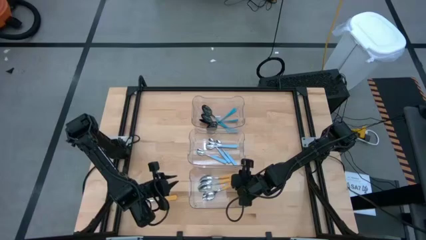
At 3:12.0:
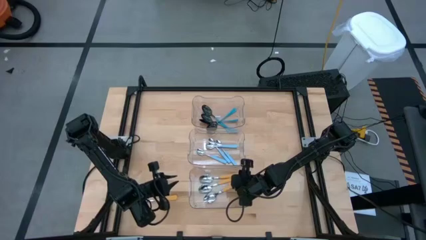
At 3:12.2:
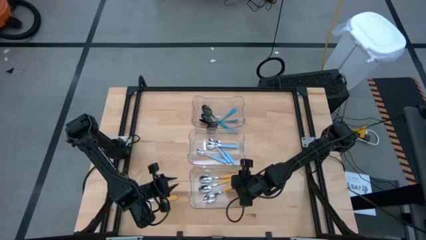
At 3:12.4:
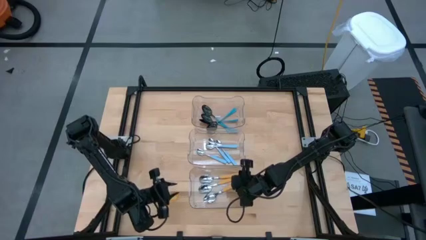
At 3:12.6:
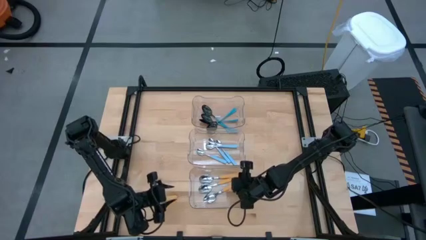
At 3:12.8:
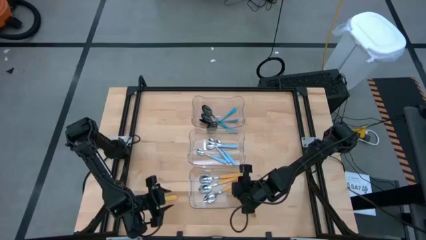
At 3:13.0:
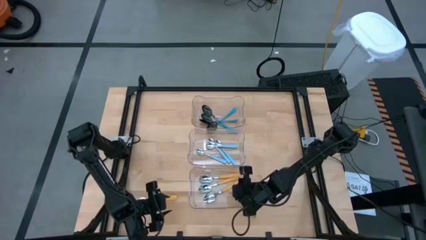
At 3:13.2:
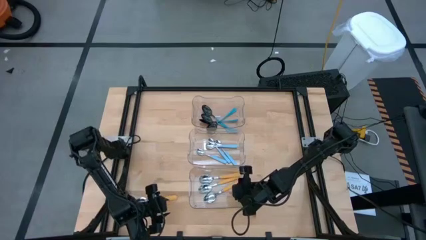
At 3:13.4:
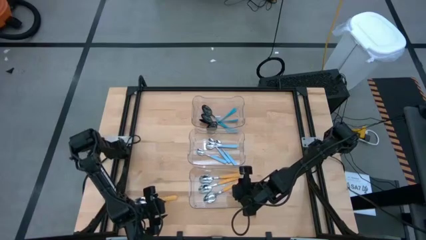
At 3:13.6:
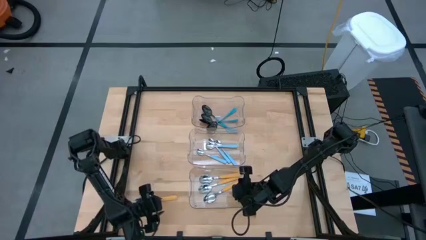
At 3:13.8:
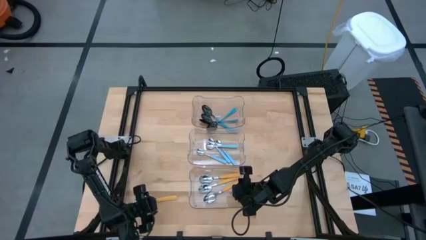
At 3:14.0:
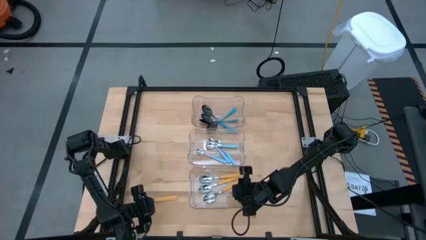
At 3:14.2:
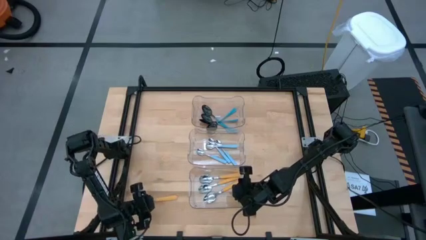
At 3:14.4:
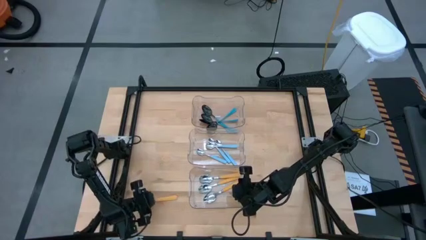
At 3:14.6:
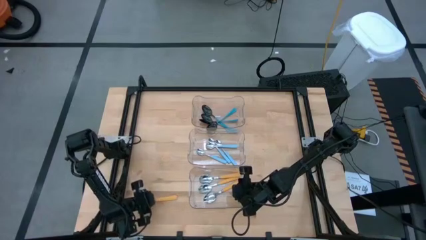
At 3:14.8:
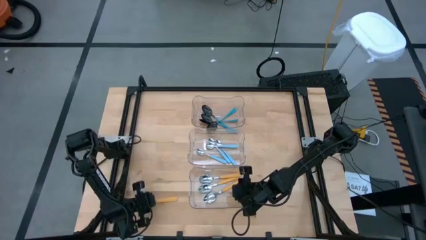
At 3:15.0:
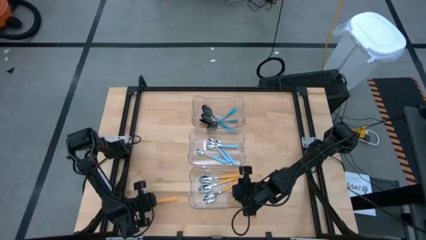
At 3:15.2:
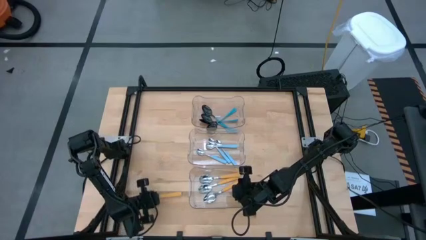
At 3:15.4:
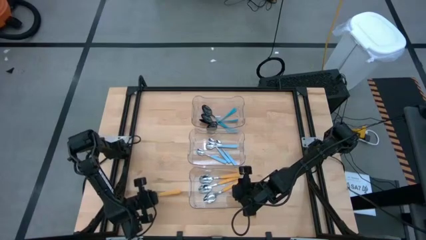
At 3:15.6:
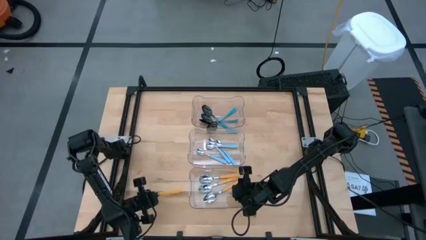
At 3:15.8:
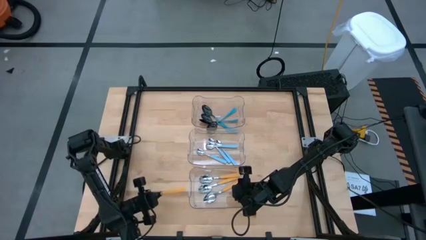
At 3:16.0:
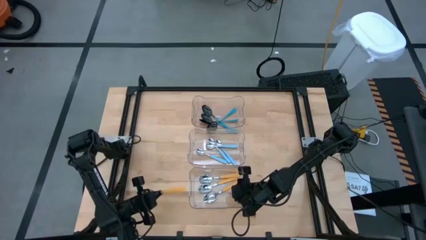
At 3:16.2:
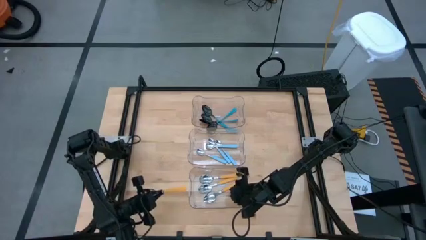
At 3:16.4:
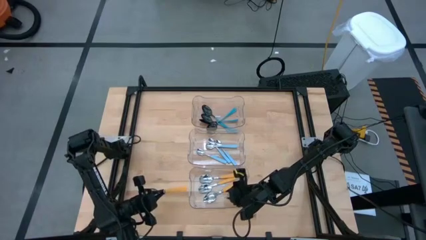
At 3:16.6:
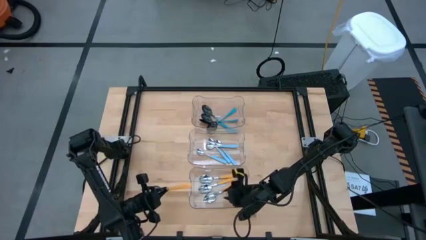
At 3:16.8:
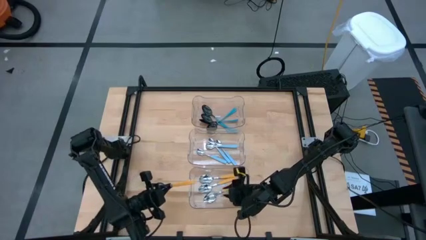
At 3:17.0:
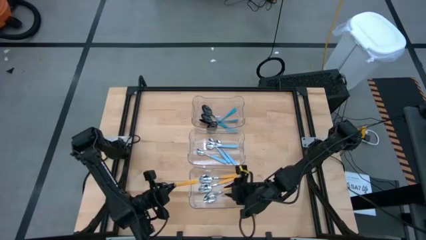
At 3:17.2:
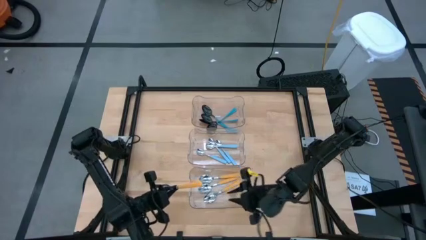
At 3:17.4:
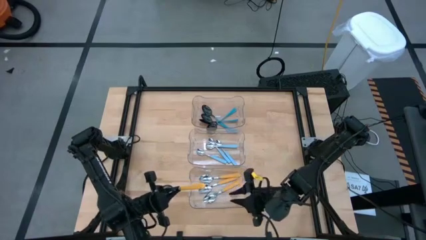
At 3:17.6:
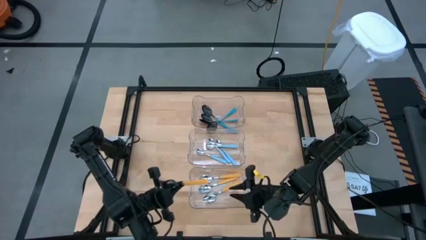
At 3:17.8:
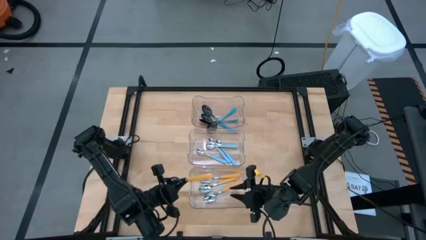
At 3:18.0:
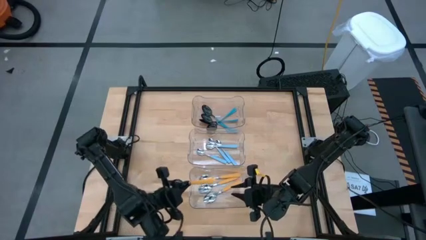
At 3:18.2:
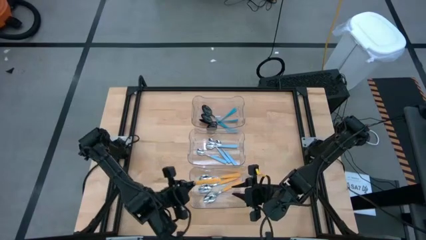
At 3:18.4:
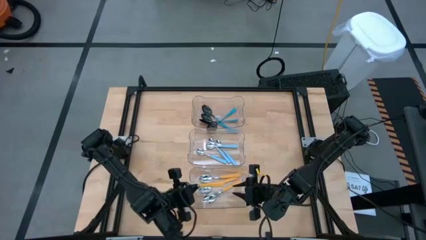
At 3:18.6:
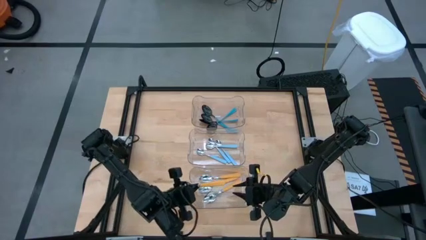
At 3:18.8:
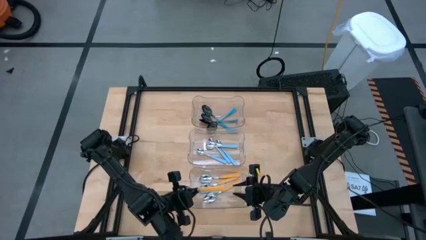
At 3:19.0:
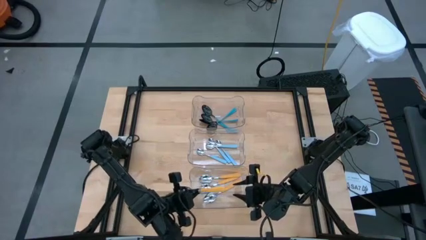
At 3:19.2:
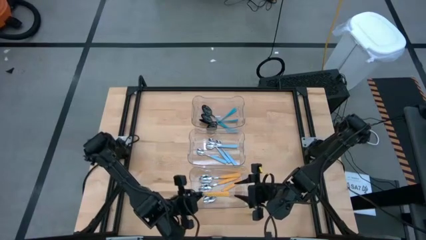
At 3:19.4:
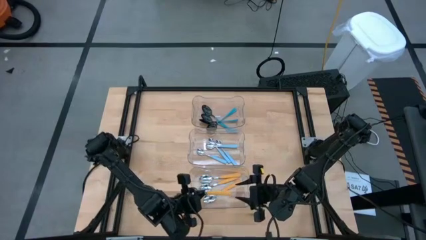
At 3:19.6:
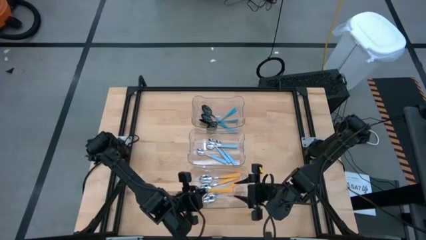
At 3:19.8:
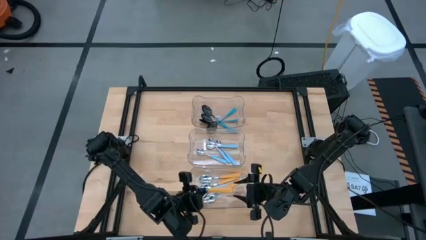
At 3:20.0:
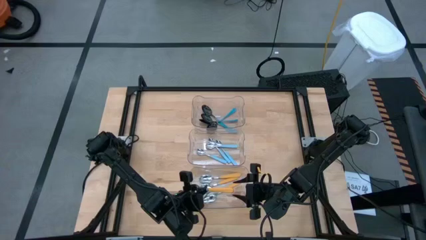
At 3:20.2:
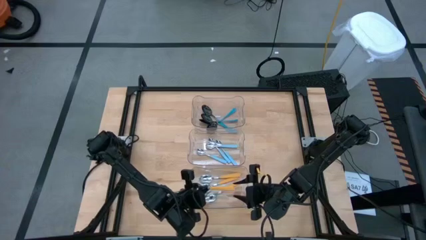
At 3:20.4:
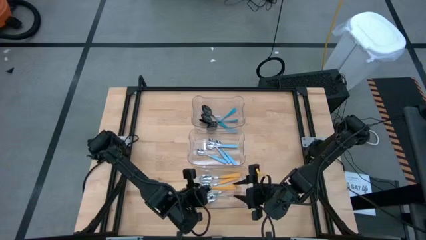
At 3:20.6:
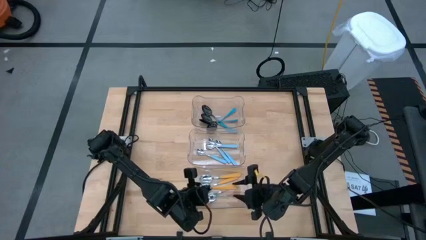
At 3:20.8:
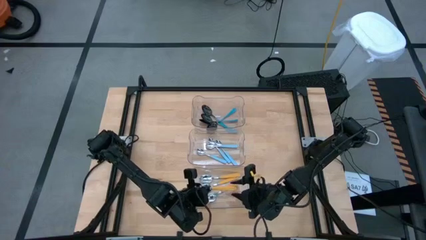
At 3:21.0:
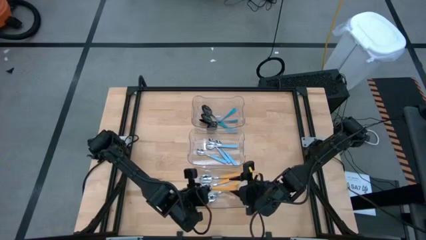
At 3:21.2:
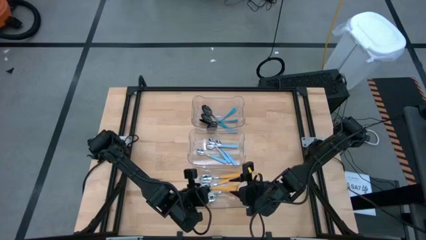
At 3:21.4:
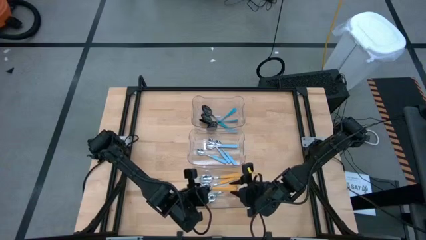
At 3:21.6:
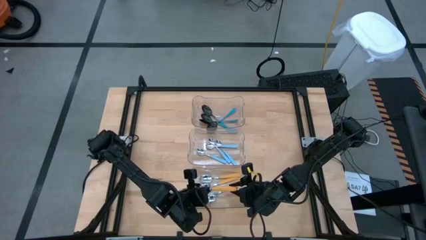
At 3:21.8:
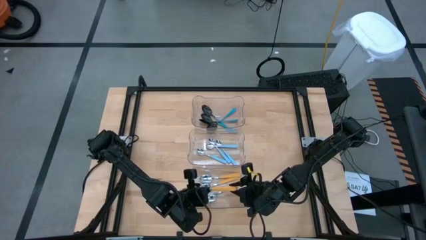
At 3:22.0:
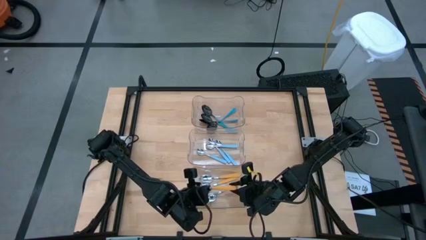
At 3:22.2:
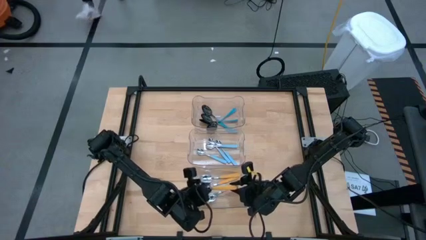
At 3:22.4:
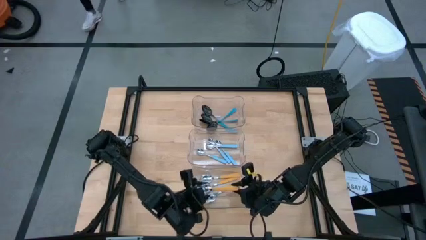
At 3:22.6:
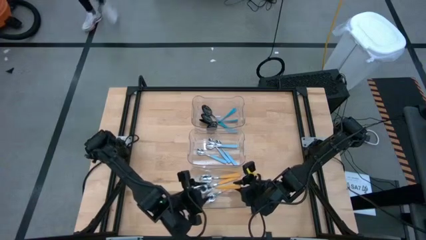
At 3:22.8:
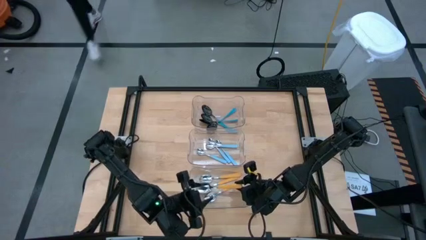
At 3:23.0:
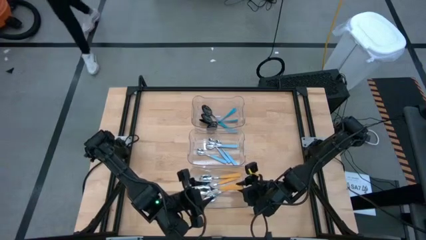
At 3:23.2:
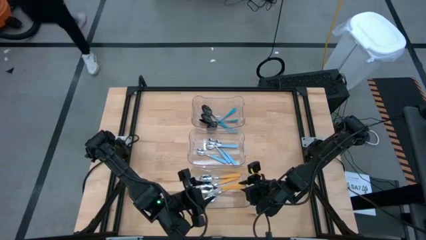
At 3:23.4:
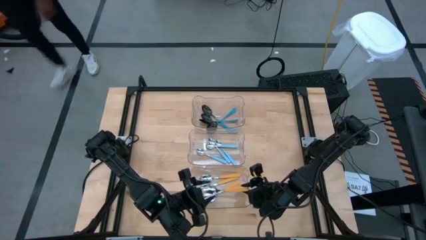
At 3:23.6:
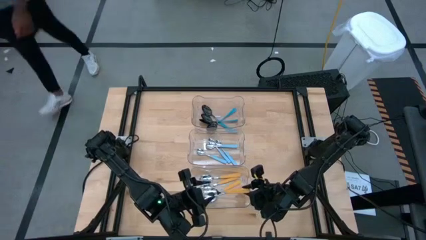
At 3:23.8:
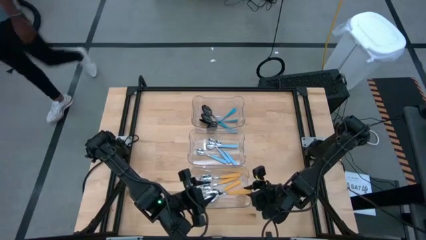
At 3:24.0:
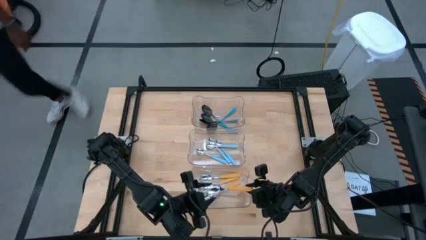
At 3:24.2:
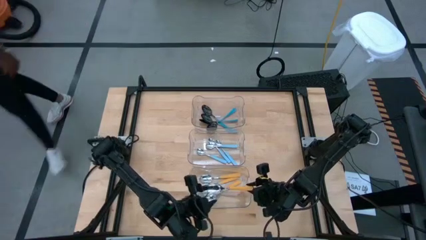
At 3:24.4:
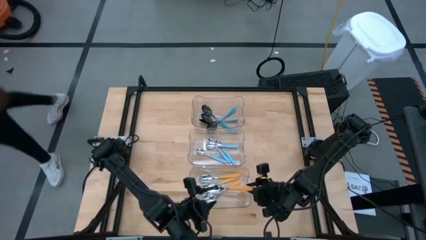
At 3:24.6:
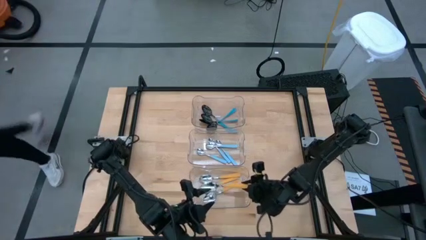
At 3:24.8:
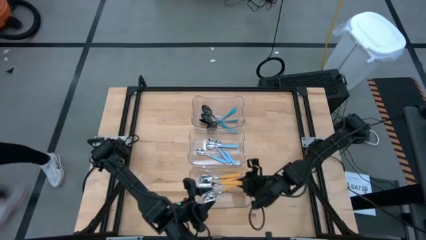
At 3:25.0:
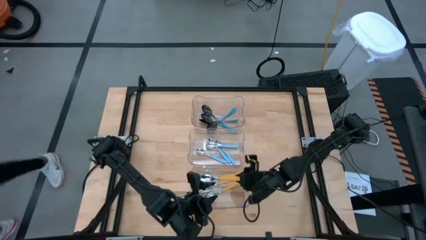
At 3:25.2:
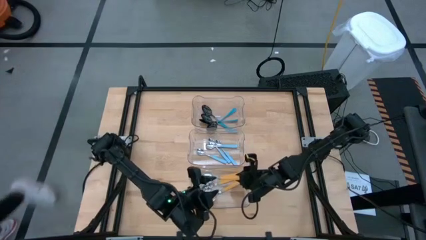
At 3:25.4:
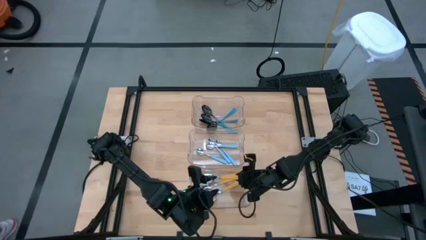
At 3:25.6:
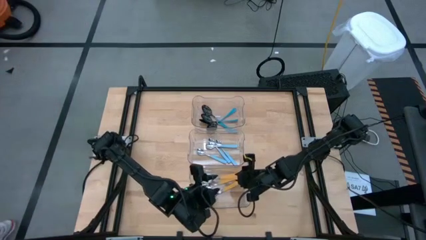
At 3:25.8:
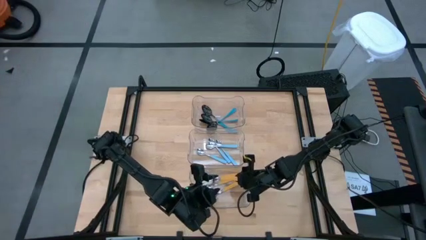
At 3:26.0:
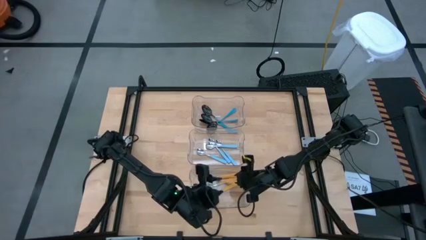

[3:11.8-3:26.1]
Task: Sort silverware by color (type)
Put the yellow spoon into the bottom transparent bin

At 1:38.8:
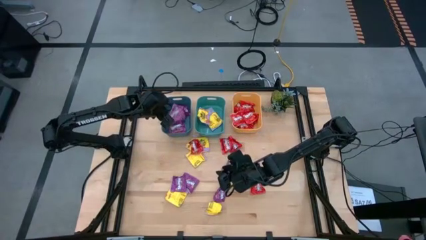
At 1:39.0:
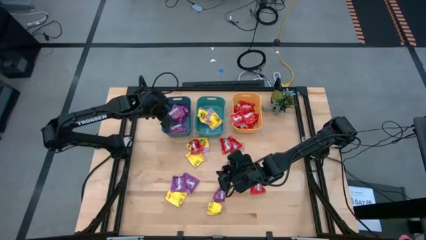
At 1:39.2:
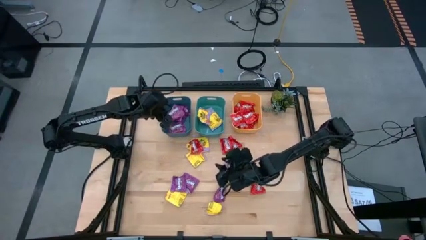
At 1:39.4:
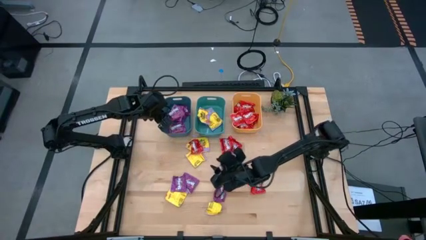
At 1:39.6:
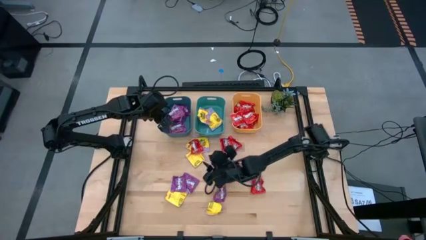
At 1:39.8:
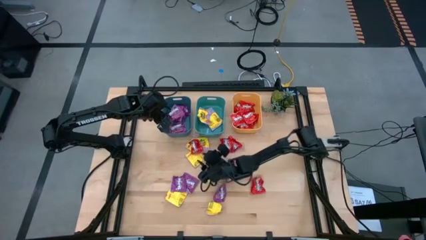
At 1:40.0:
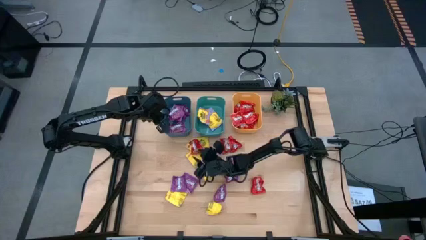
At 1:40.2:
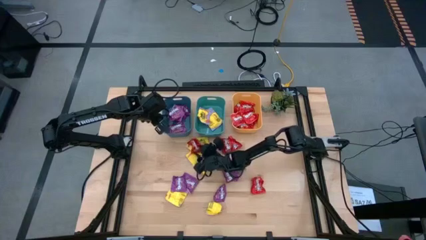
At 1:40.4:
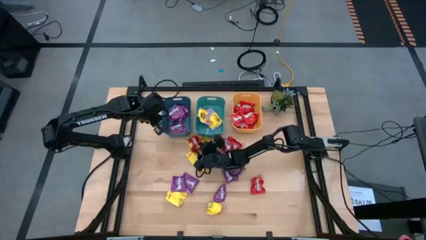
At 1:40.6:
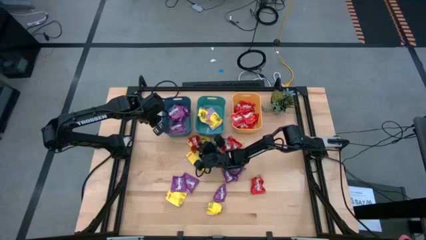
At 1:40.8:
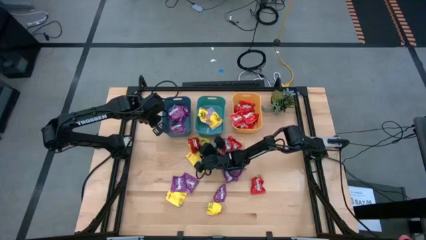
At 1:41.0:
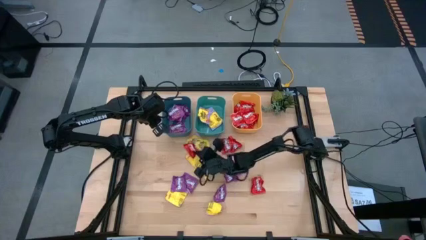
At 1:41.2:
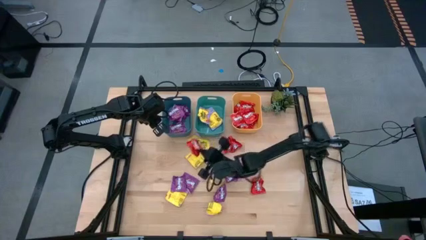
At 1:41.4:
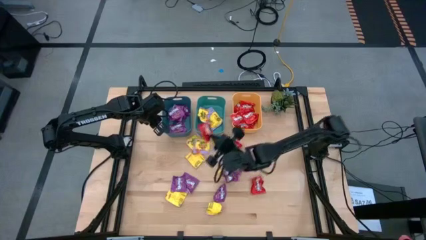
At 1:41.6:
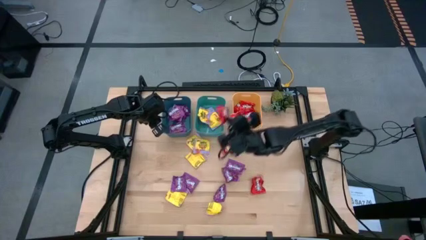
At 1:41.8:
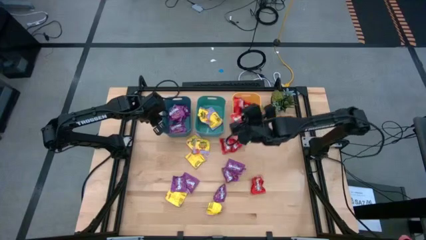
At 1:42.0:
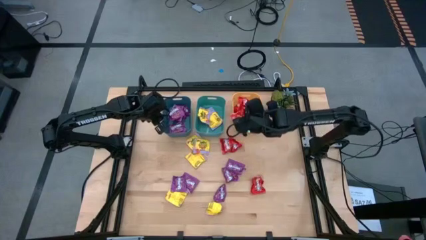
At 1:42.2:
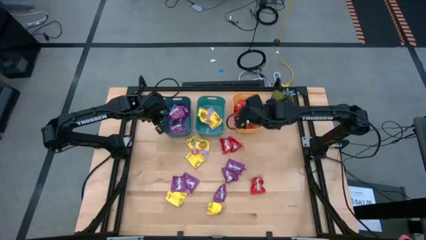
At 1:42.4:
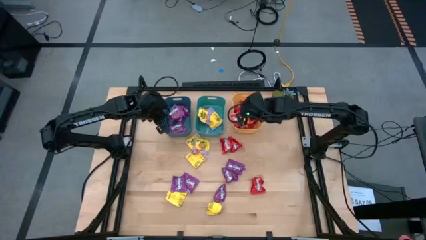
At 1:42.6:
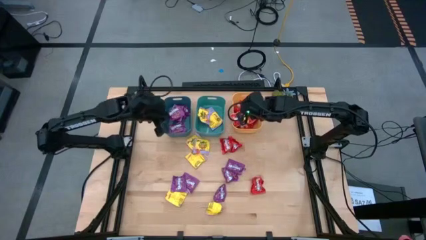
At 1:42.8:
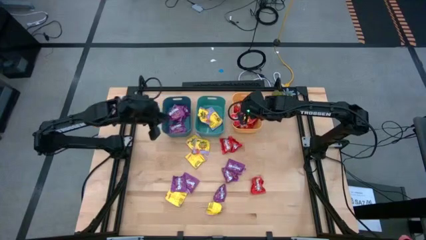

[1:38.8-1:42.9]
Task: Sort candy
Put the red candy into the yellow bin
